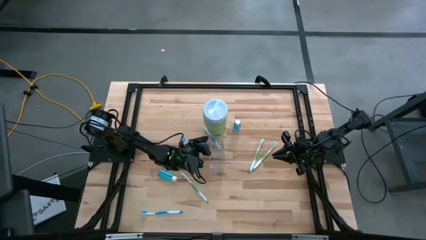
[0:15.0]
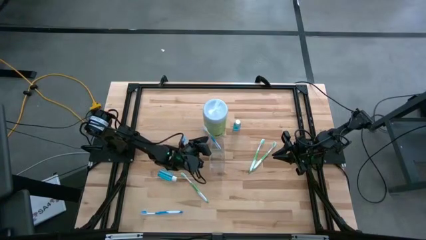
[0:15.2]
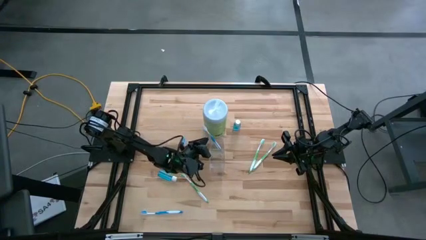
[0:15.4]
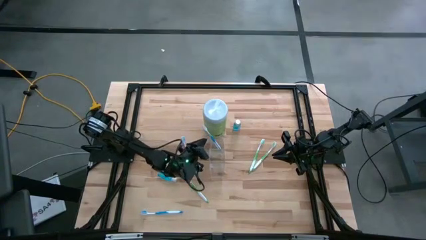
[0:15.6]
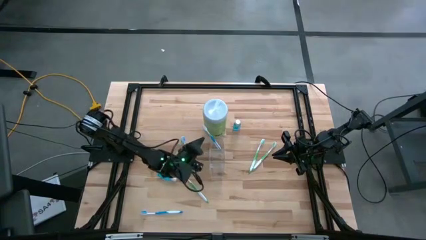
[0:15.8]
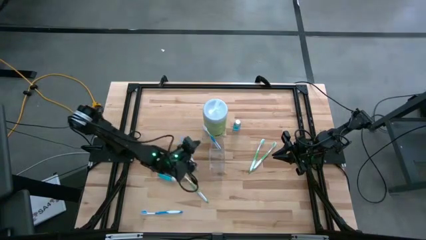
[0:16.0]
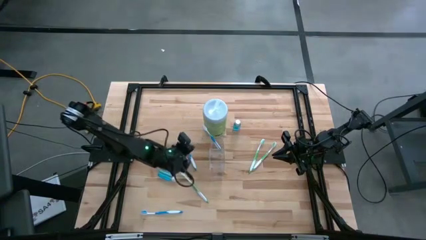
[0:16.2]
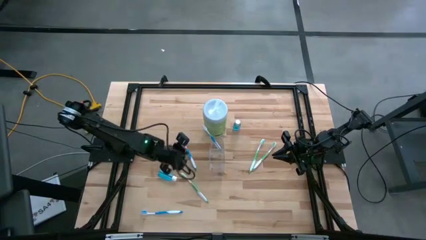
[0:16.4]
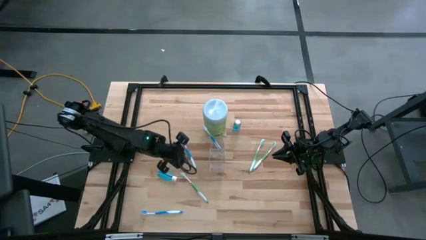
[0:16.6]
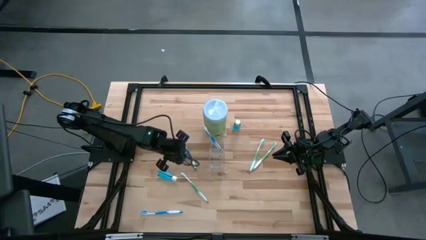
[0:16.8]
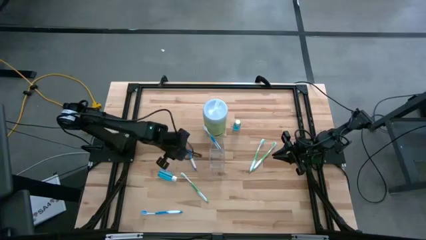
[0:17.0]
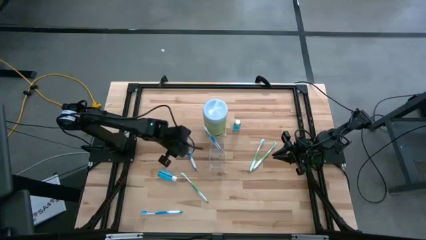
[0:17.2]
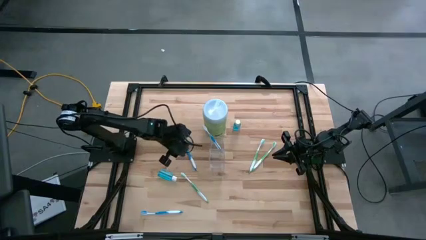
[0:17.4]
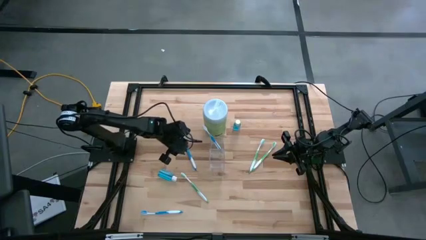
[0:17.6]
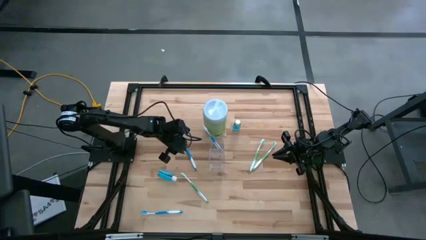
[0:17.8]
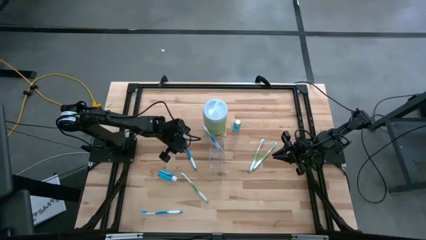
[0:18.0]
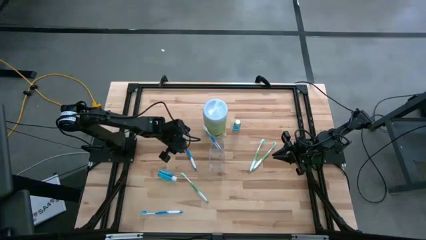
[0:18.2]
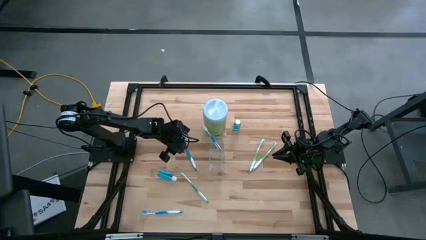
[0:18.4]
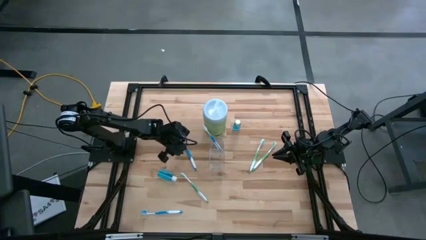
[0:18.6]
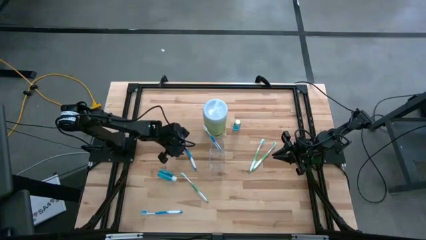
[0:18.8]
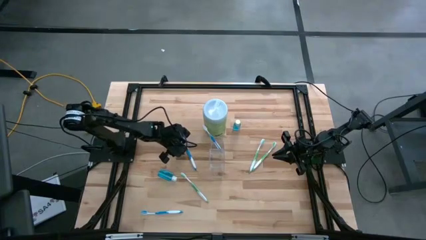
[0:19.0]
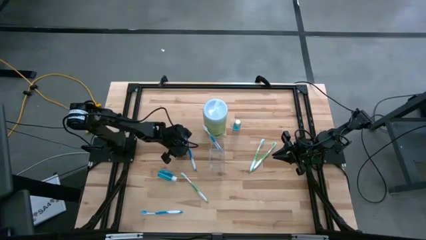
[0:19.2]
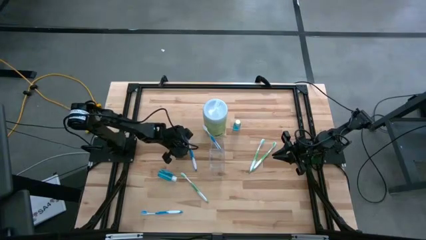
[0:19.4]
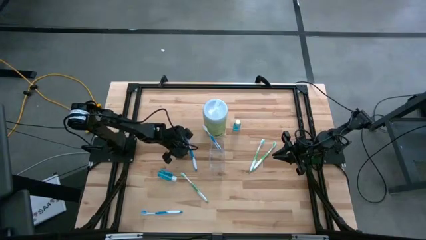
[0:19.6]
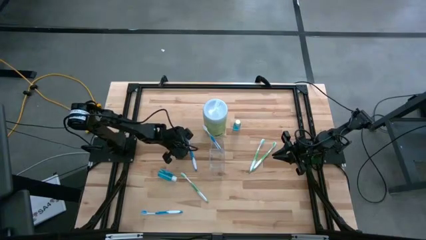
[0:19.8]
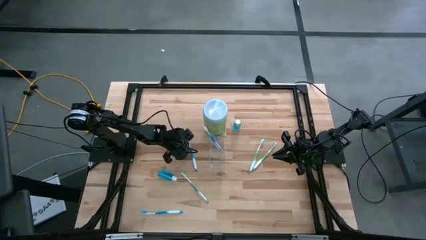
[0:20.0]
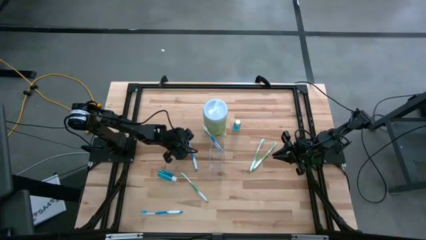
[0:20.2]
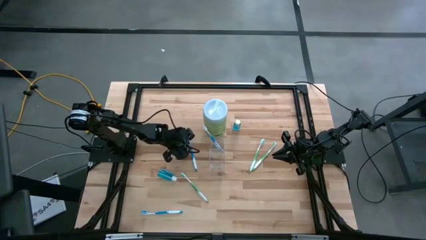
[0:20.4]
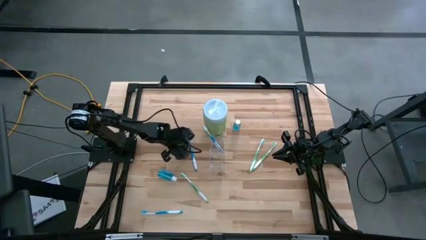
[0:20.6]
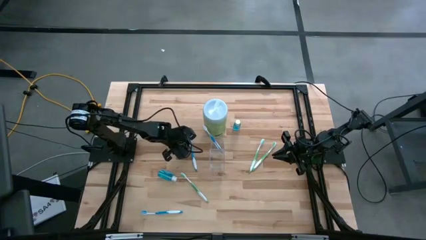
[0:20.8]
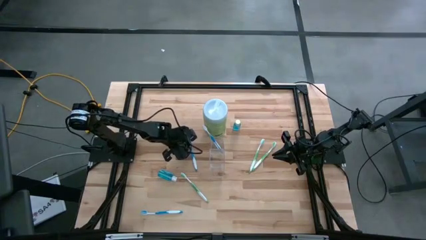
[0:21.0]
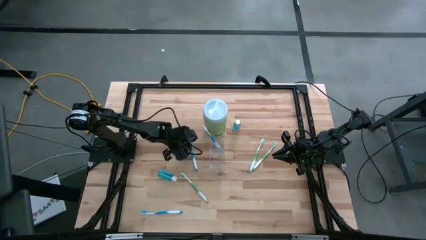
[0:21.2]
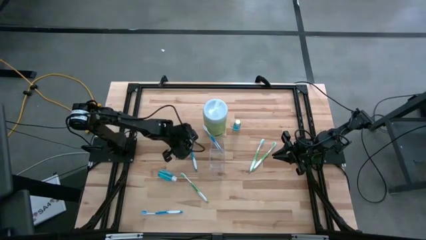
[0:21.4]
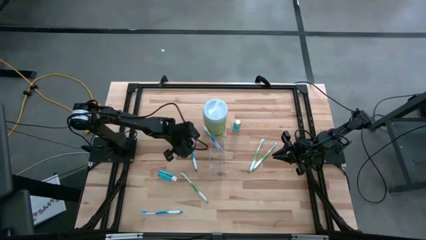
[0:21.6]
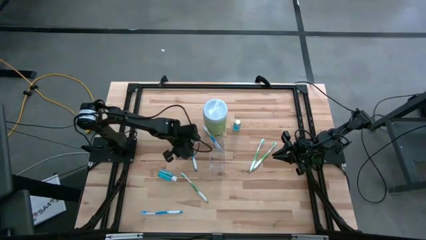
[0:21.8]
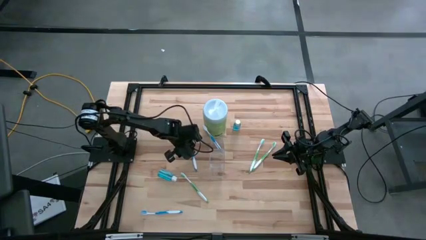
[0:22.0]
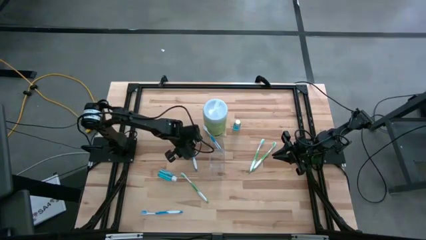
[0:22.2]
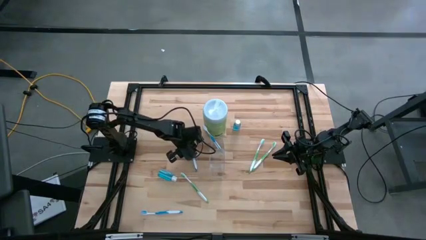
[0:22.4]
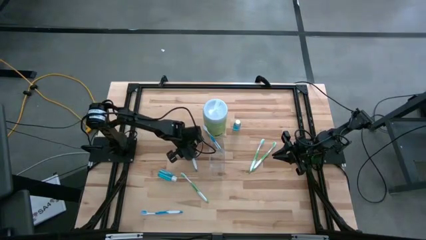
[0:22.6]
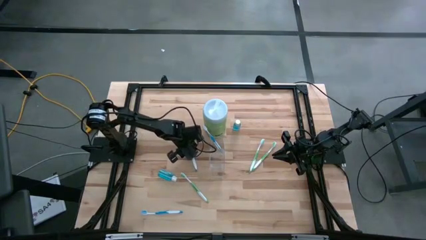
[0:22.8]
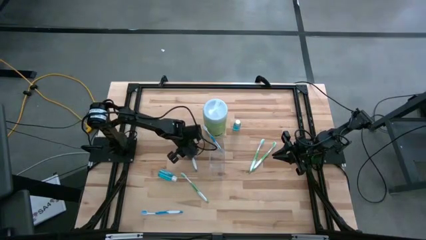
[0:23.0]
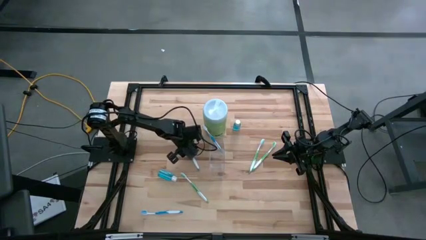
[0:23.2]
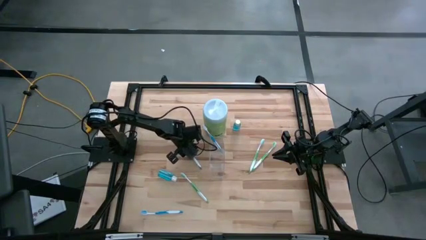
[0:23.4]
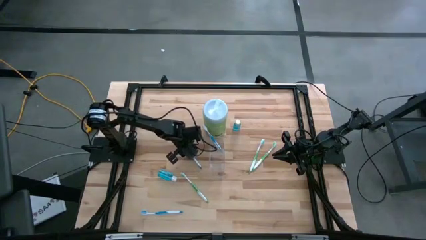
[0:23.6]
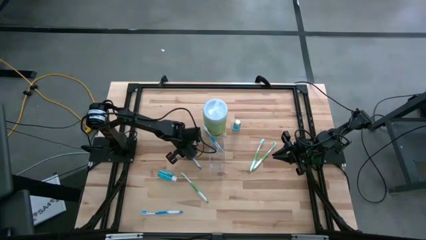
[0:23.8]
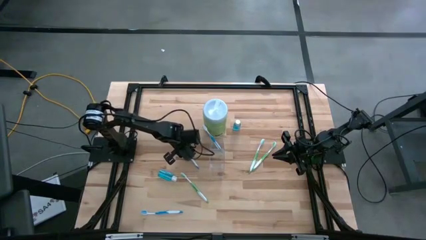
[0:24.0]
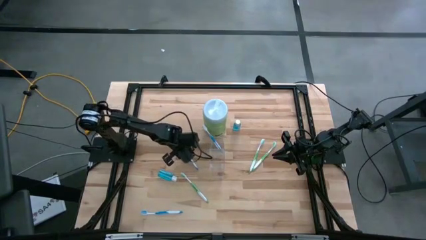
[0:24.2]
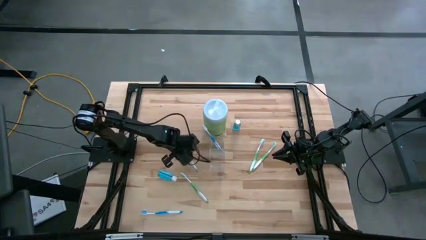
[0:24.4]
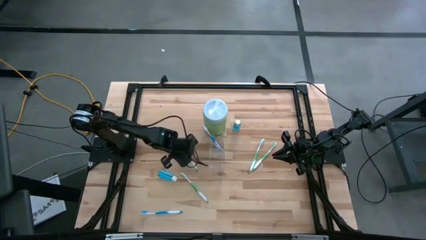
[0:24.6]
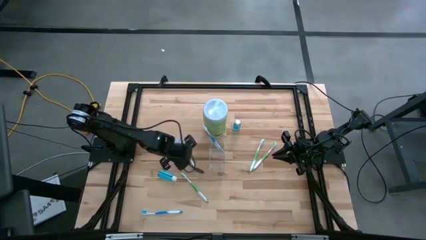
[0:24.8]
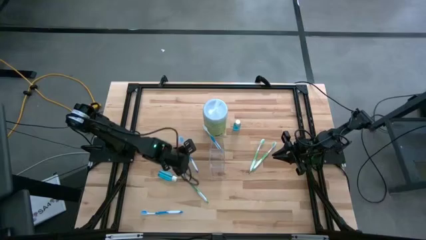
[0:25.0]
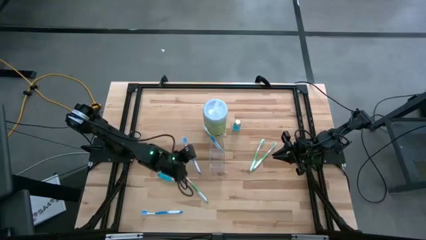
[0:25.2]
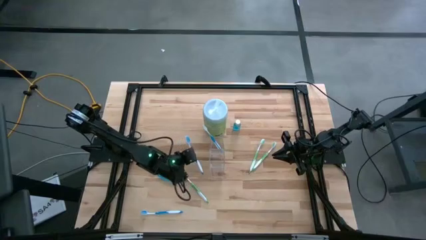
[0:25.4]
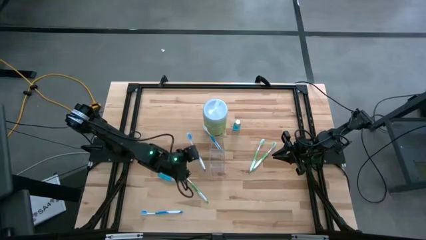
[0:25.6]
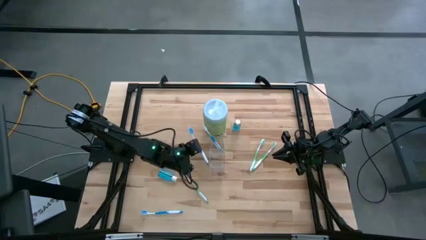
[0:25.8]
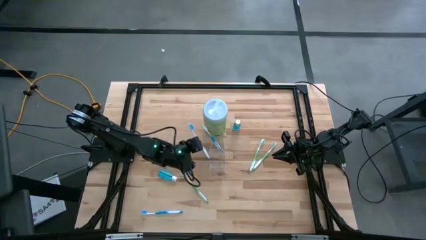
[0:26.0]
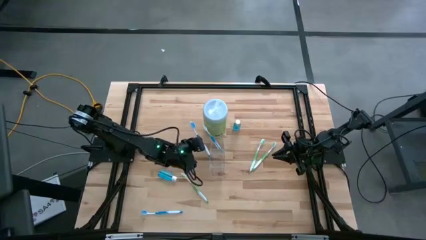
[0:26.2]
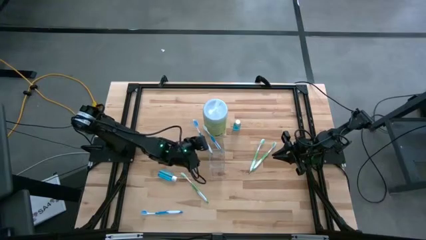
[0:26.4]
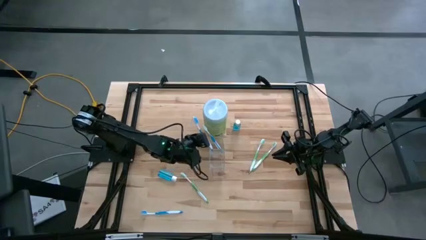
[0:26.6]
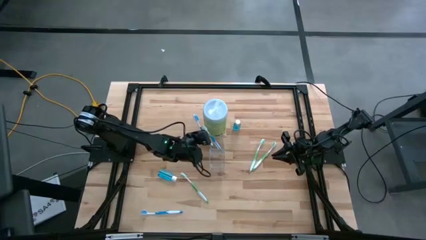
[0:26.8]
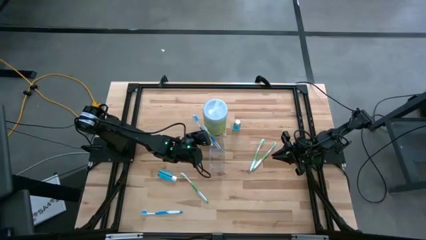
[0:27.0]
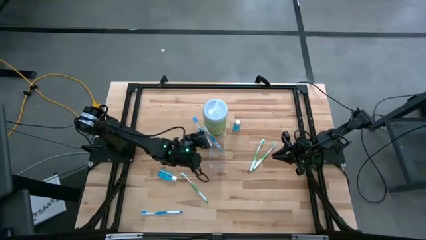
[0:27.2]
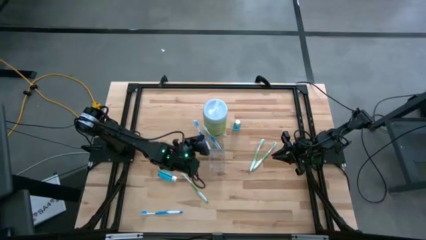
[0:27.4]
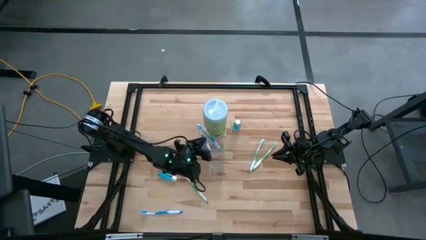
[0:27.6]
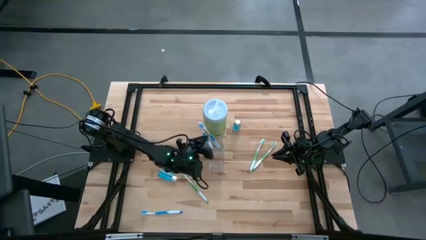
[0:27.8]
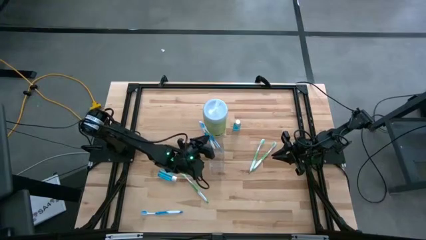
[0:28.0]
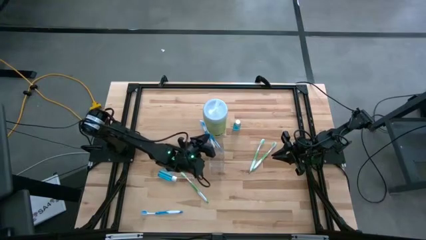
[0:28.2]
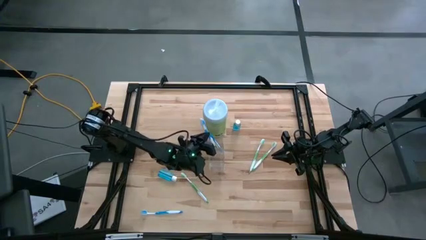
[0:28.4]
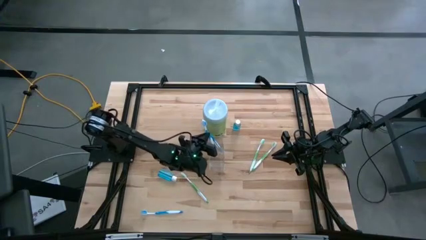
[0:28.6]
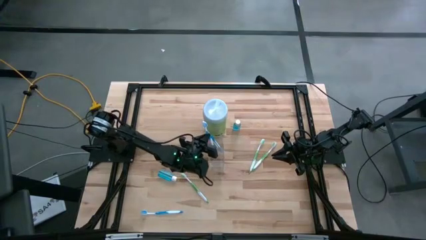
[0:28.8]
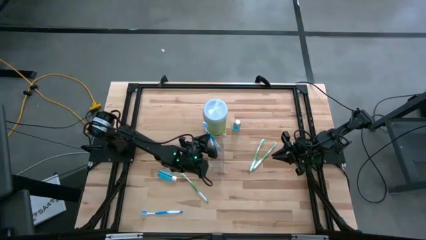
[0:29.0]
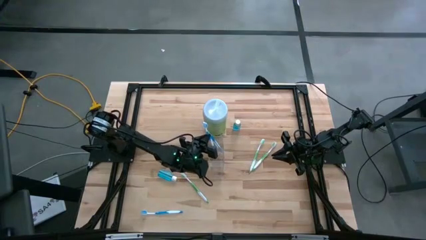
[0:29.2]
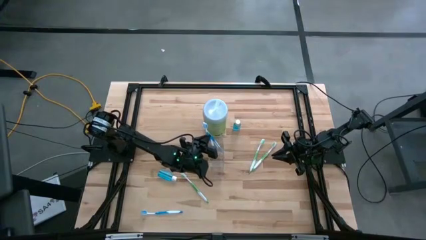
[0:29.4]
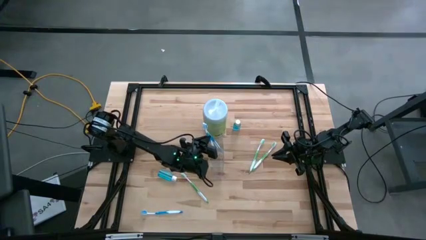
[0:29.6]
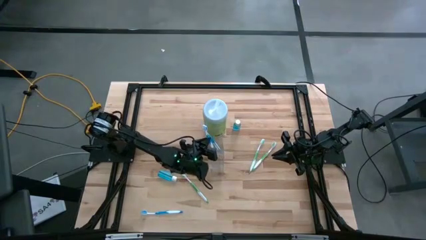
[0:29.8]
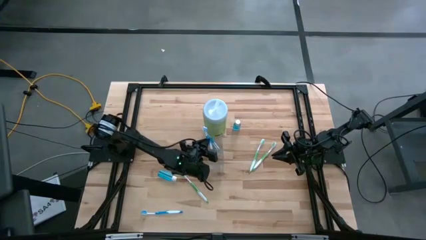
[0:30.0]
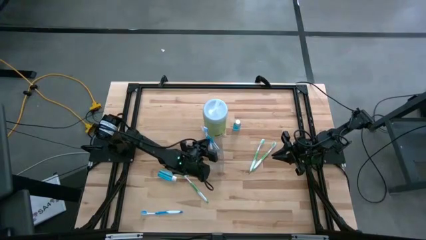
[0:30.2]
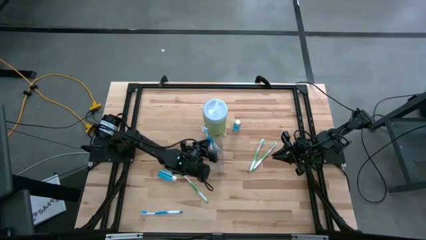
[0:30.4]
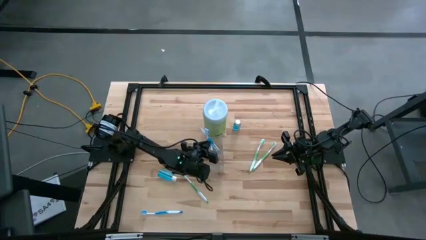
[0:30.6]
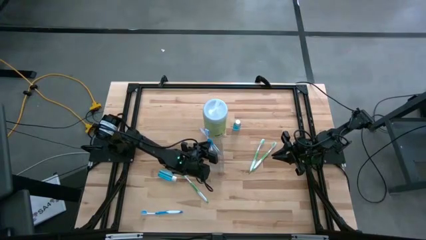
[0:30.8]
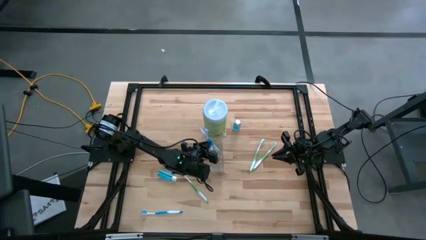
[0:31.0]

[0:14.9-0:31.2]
Task: Pick & Place toothbrushing station
Put the top blue toothbrush into the transparent organizer
